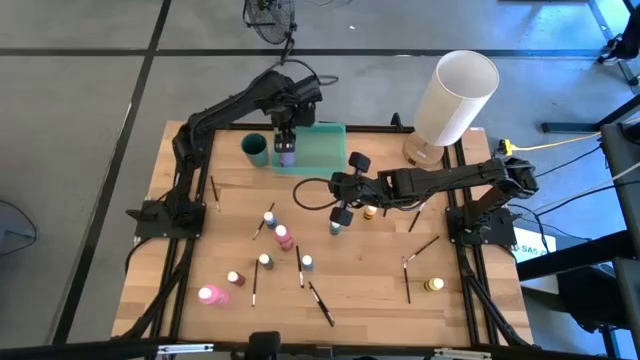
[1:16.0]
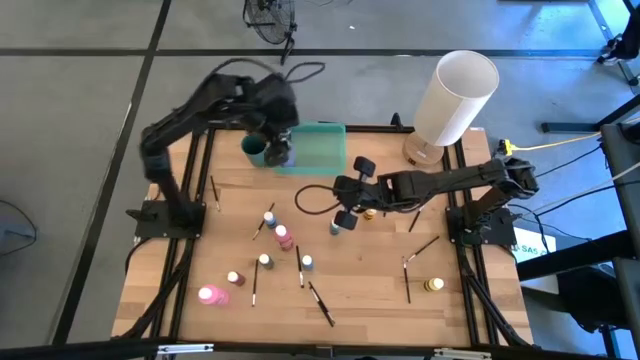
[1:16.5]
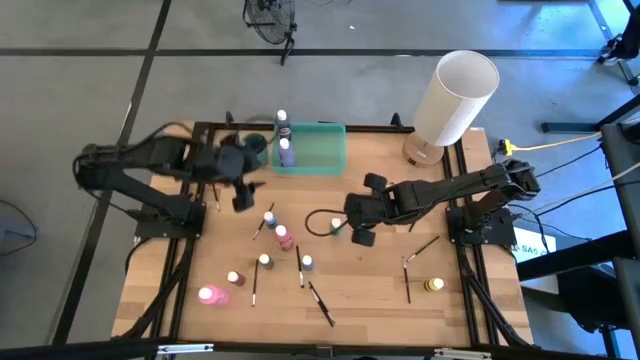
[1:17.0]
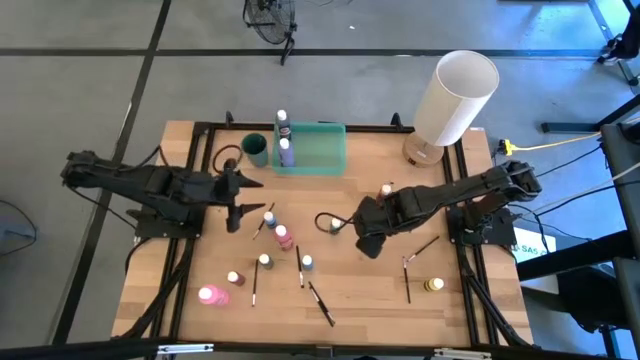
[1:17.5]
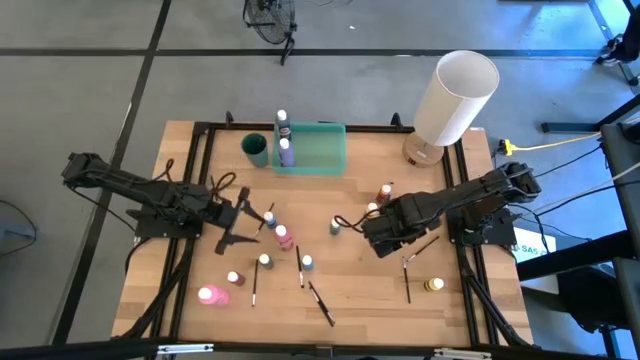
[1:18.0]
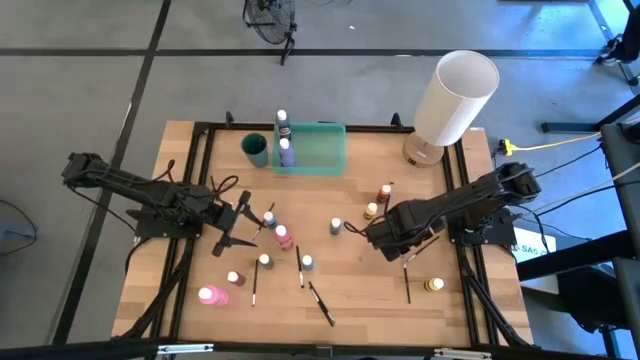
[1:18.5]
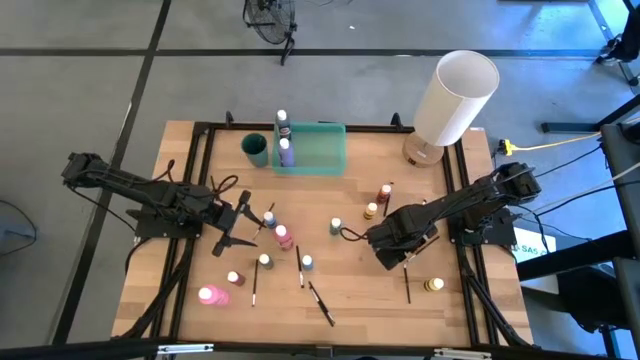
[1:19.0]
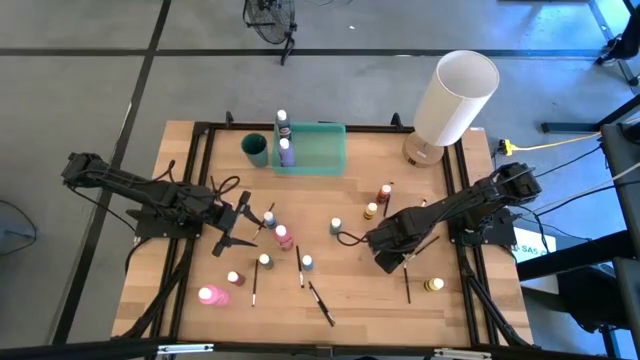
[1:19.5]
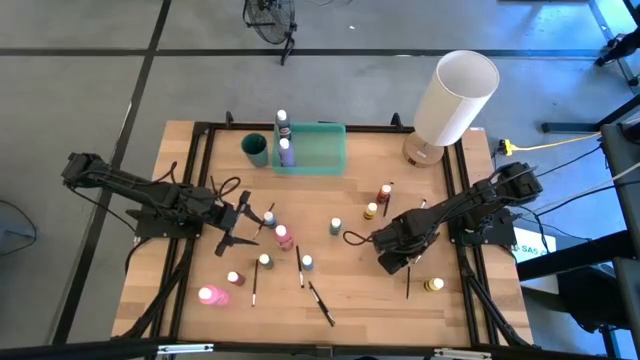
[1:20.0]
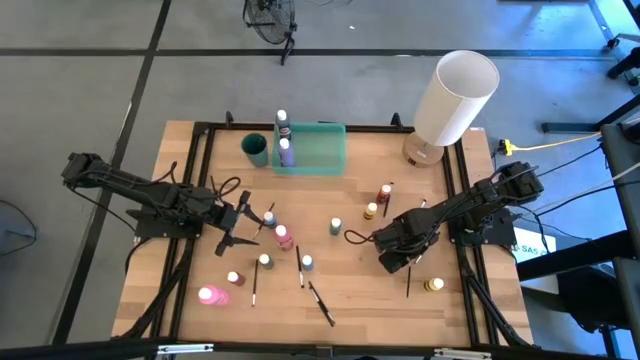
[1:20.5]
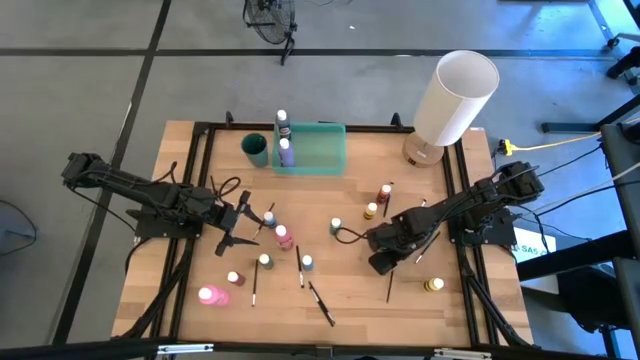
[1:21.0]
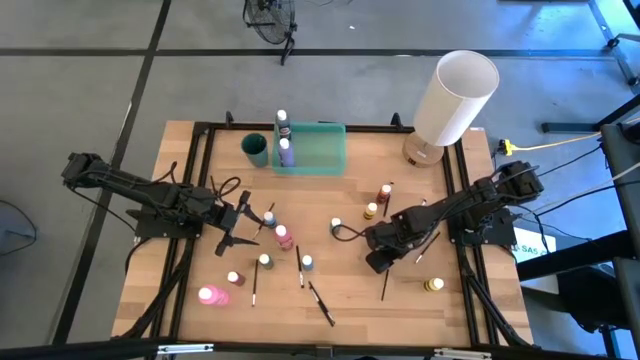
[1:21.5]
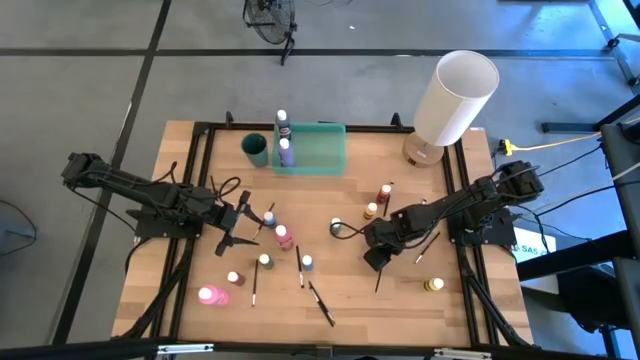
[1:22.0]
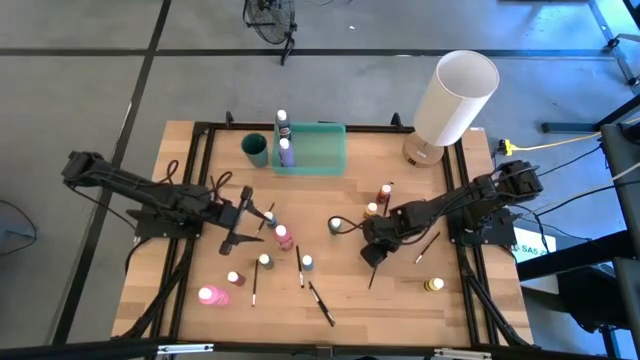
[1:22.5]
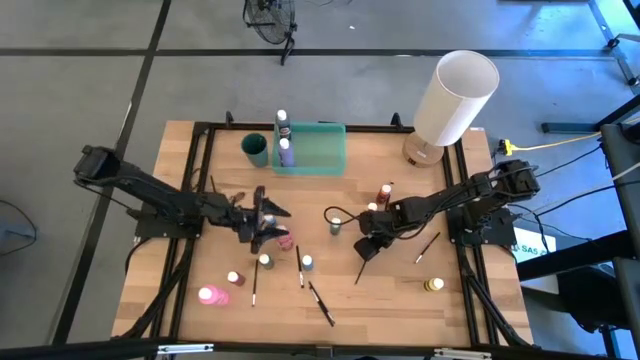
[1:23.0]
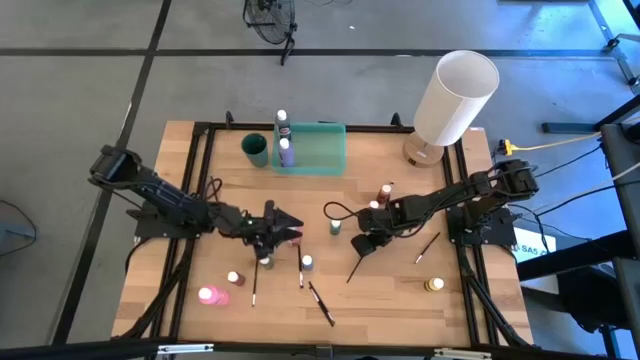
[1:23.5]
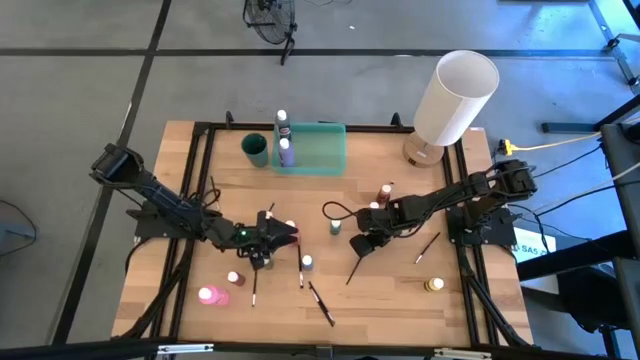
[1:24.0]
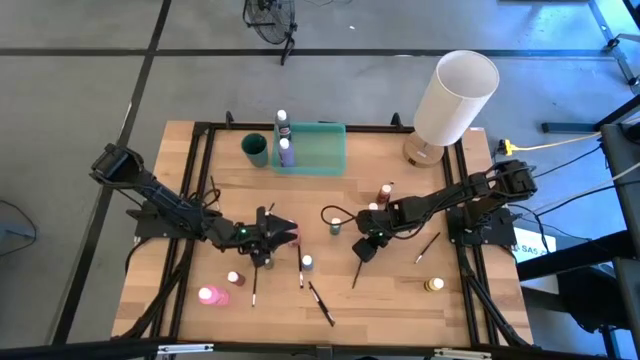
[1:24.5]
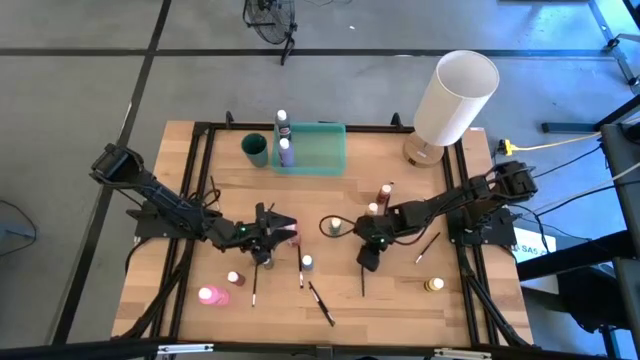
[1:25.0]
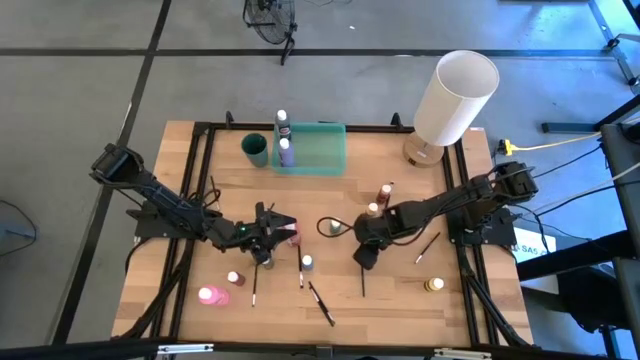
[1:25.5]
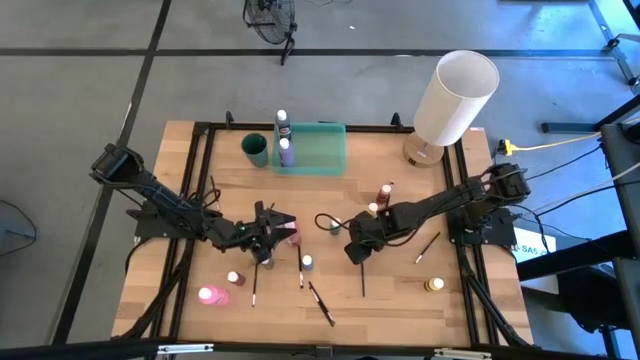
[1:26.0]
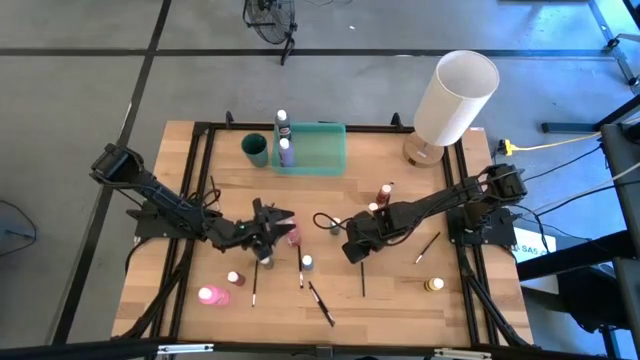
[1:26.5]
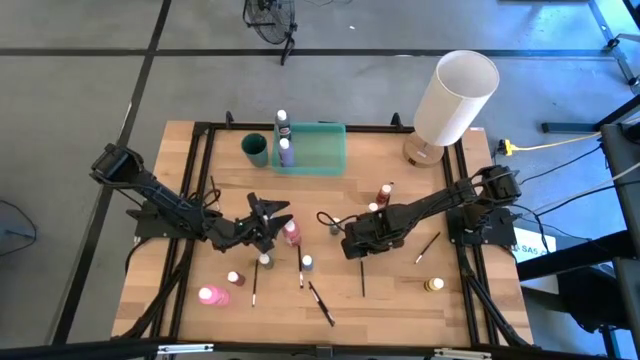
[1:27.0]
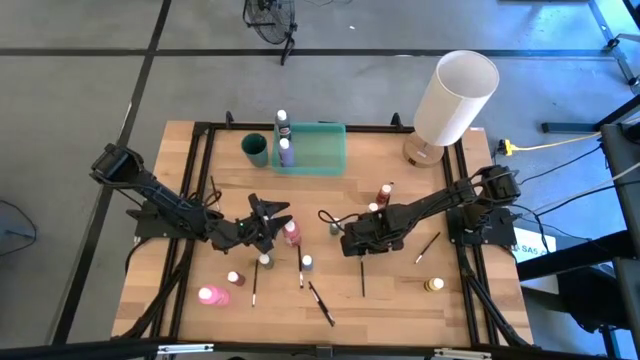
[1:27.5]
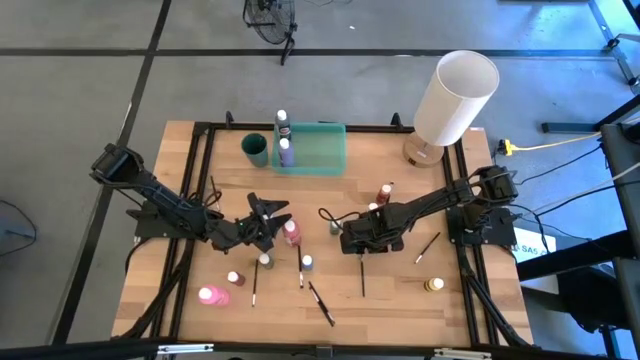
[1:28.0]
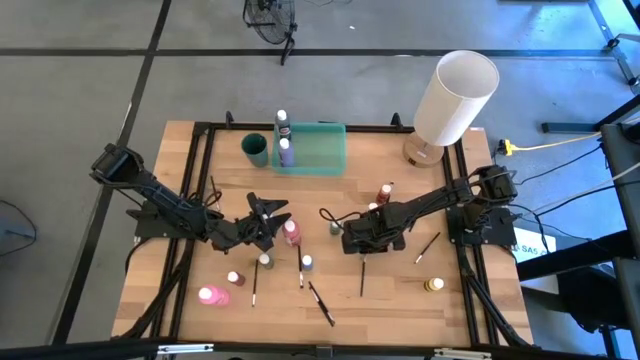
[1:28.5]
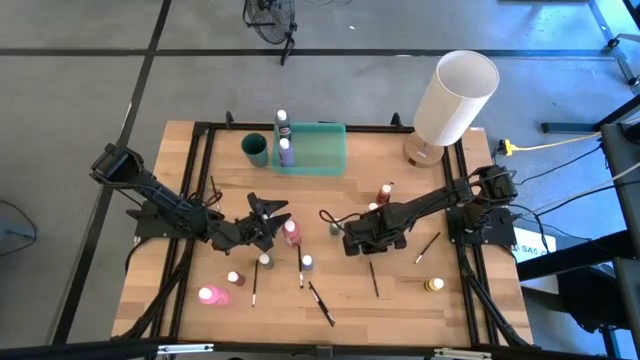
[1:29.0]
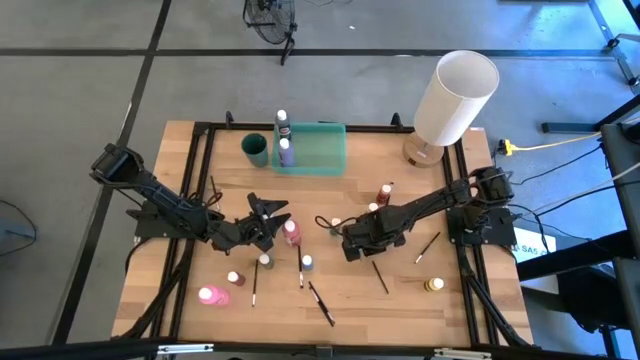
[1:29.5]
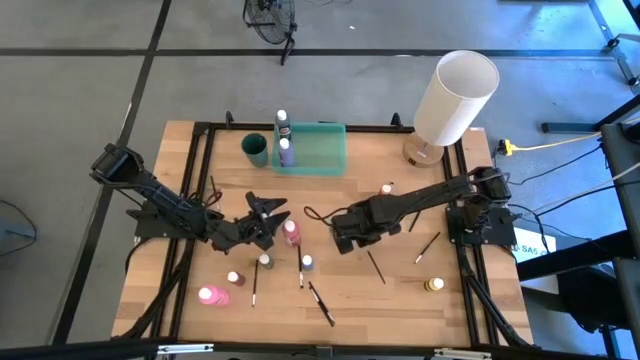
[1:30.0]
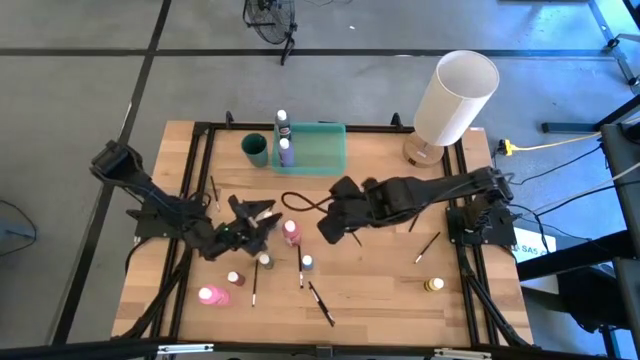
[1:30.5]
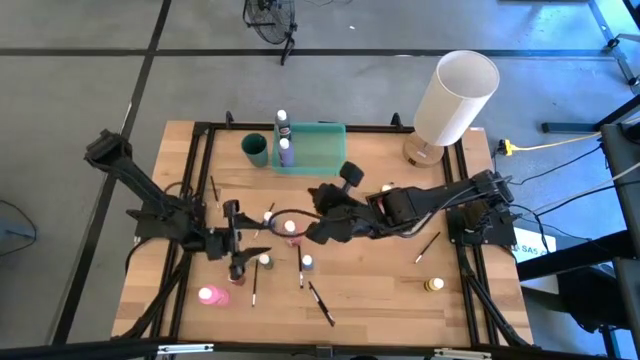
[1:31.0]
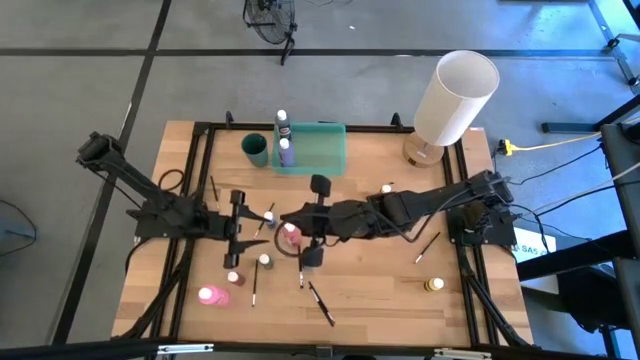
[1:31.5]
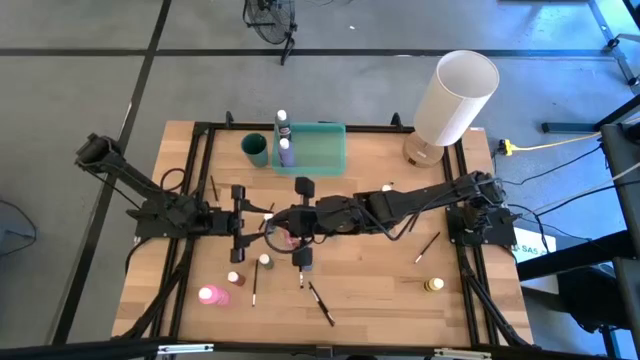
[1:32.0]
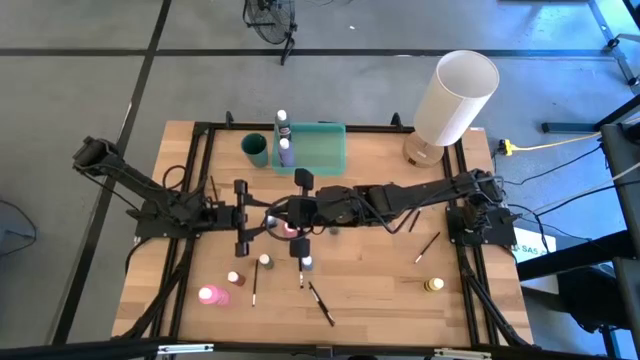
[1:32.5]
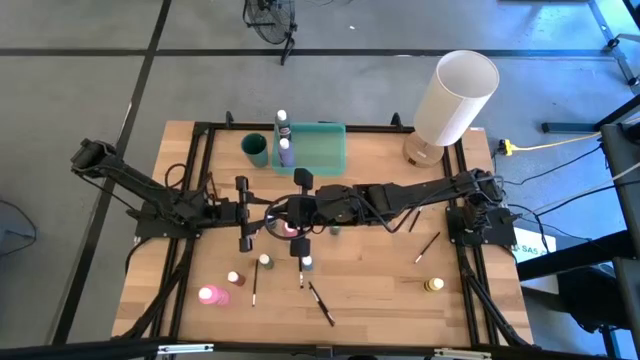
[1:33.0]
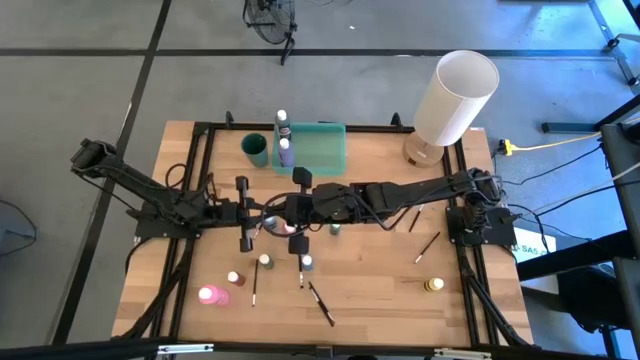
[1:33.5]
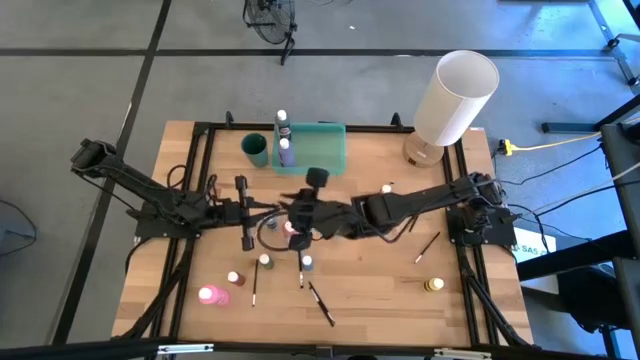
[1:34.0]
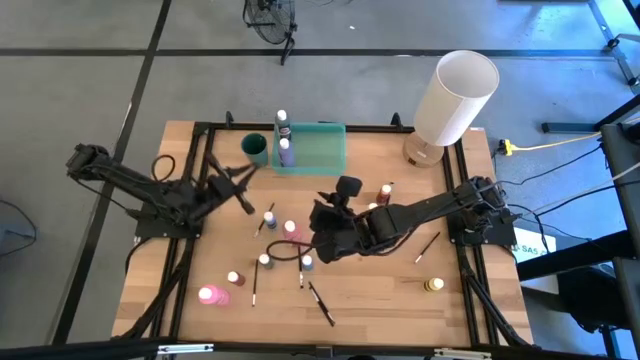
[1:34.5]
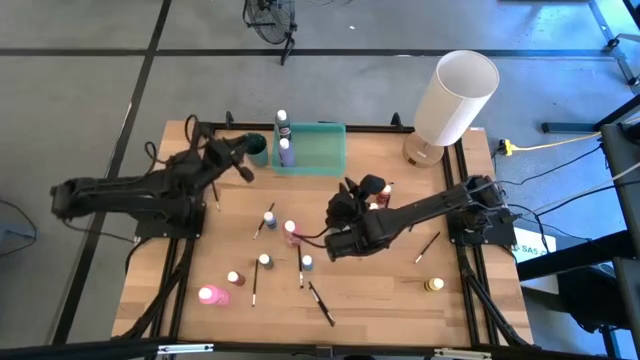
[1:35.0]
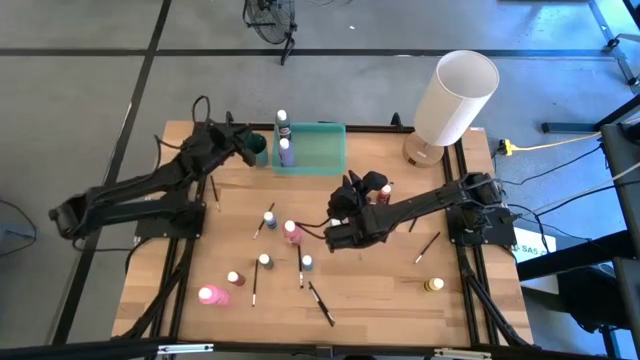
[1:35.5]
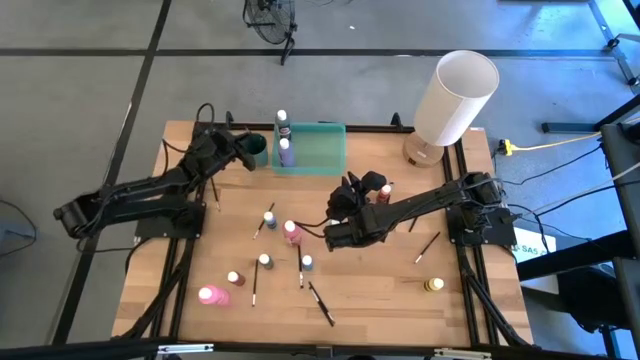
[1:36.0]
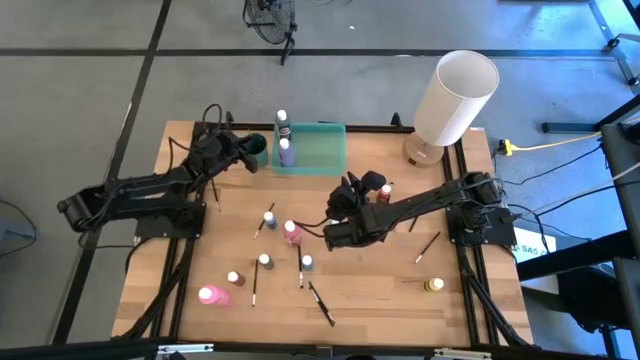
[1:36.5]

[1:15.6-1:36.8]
Task: Pick & Place Paint Supplies
Put the silver paintbrush into the green cup
